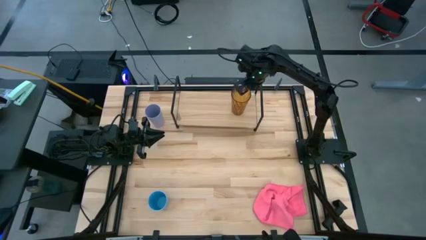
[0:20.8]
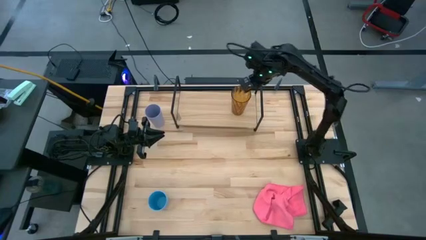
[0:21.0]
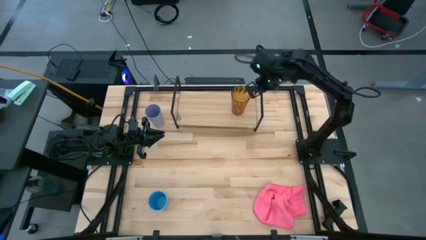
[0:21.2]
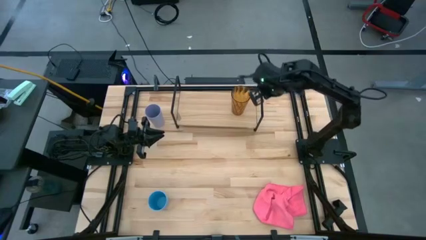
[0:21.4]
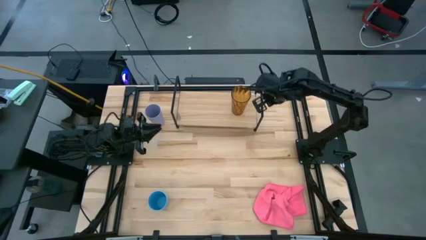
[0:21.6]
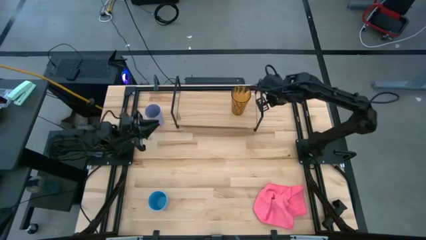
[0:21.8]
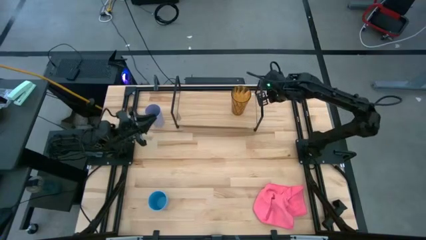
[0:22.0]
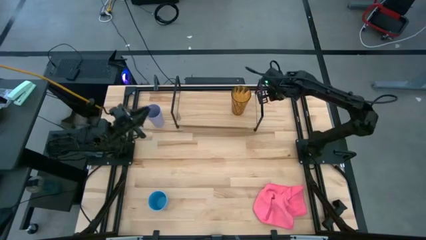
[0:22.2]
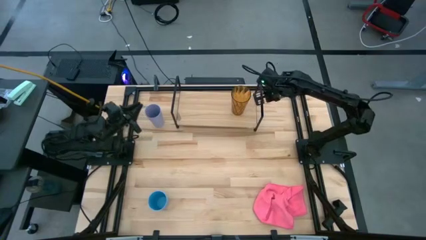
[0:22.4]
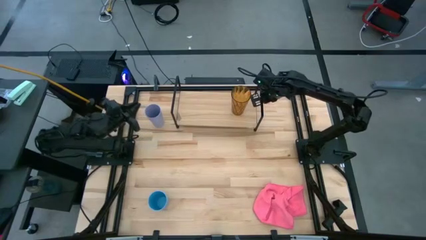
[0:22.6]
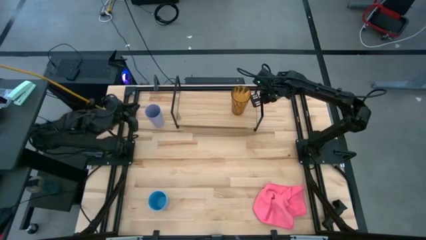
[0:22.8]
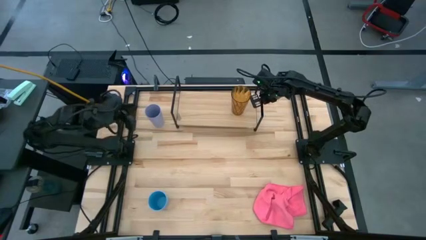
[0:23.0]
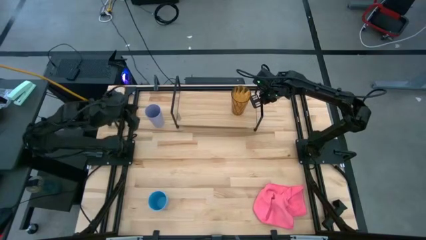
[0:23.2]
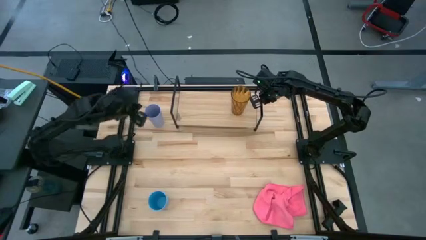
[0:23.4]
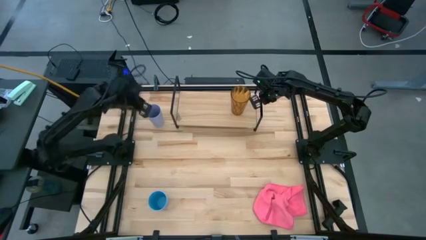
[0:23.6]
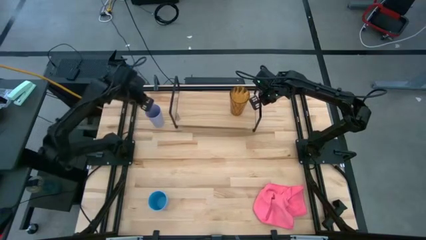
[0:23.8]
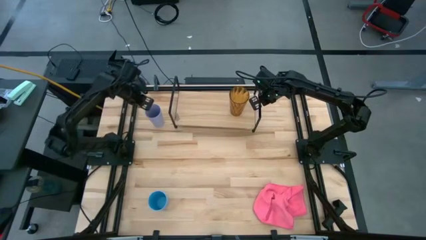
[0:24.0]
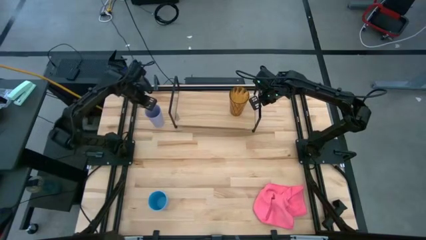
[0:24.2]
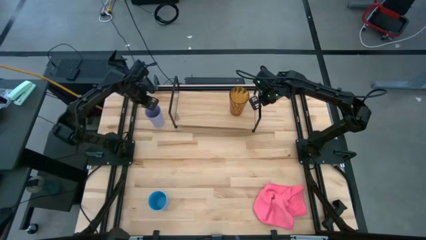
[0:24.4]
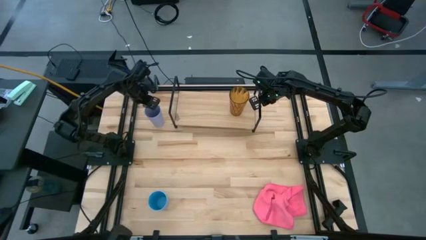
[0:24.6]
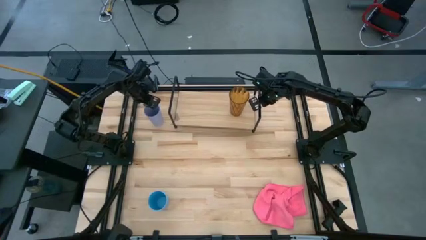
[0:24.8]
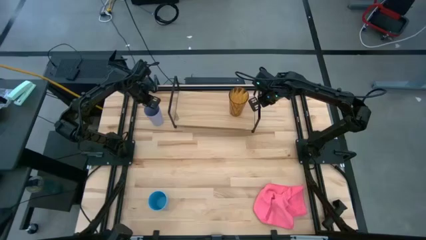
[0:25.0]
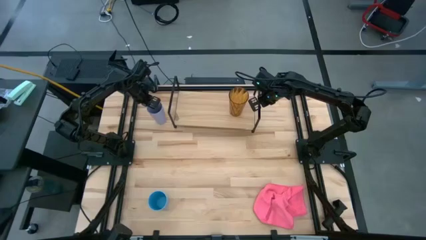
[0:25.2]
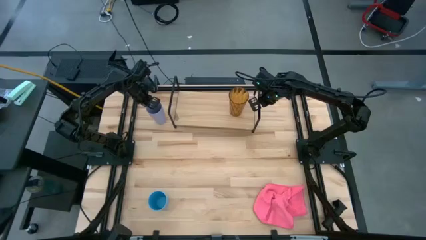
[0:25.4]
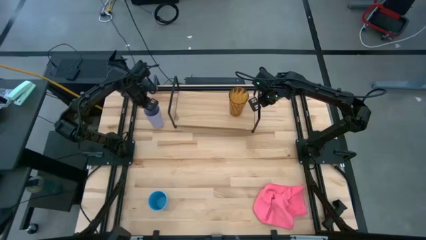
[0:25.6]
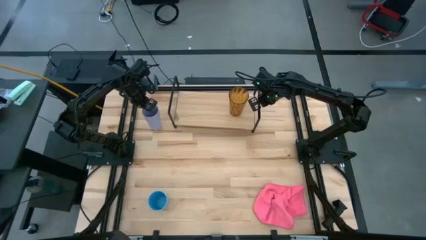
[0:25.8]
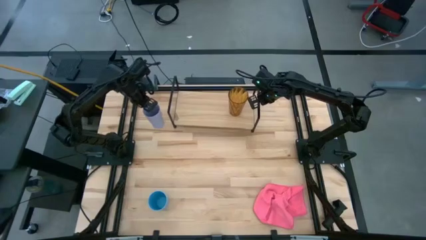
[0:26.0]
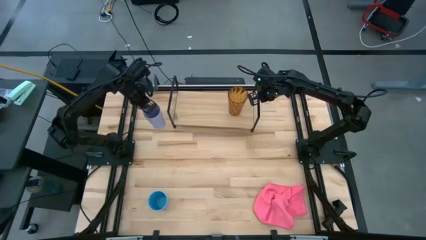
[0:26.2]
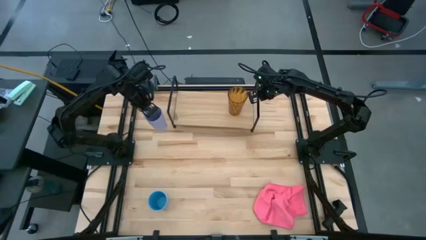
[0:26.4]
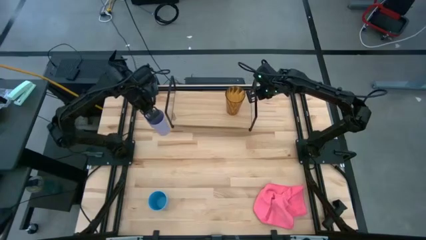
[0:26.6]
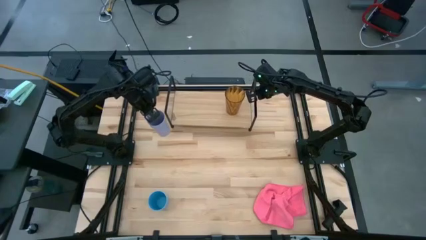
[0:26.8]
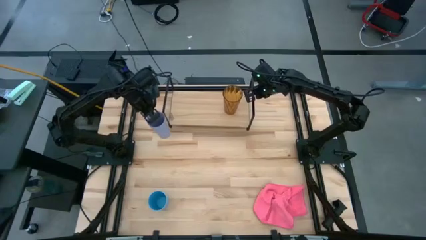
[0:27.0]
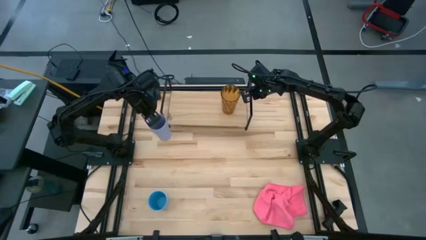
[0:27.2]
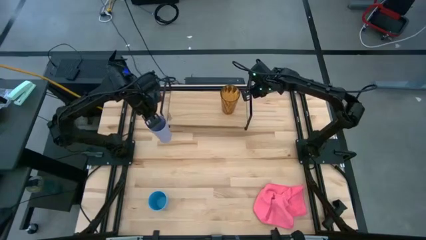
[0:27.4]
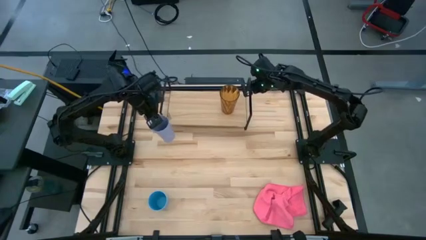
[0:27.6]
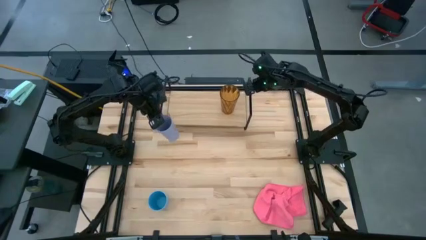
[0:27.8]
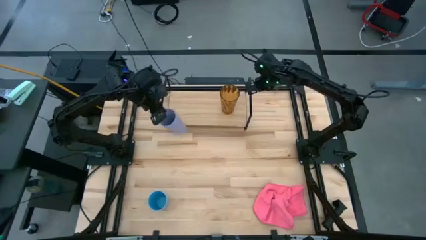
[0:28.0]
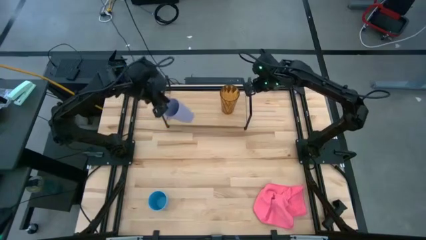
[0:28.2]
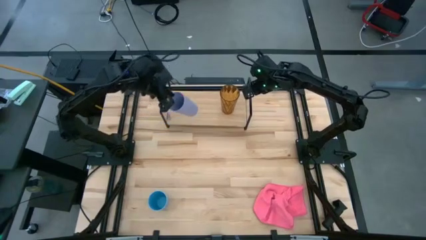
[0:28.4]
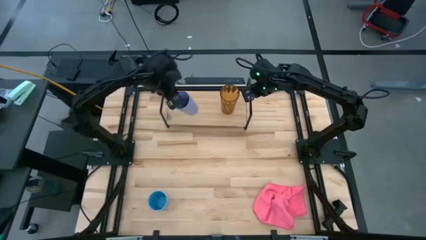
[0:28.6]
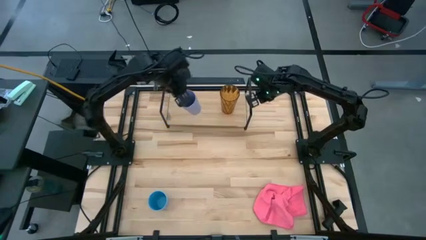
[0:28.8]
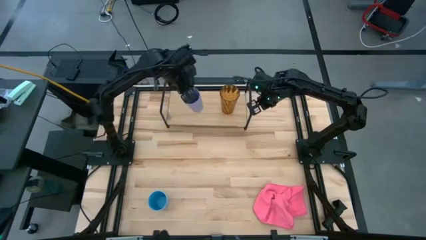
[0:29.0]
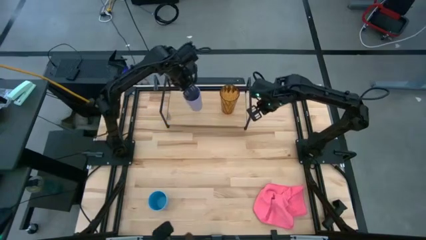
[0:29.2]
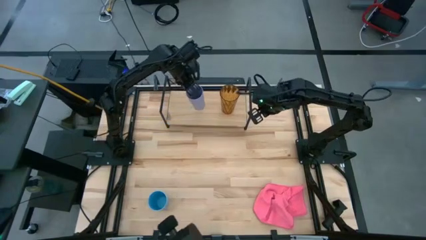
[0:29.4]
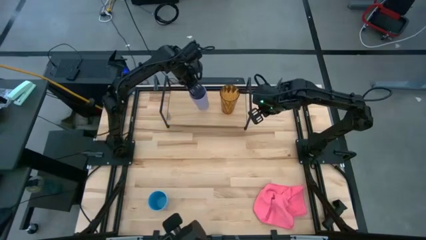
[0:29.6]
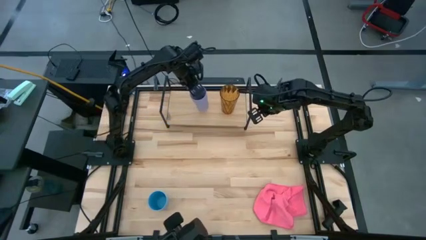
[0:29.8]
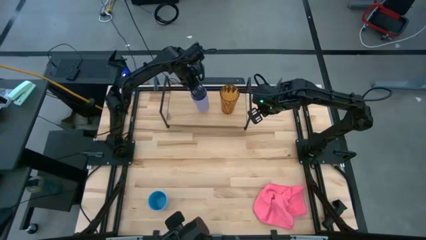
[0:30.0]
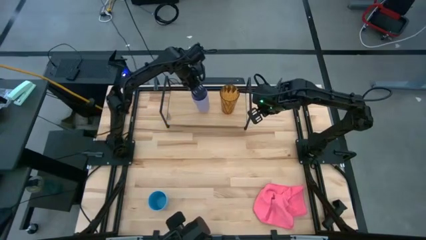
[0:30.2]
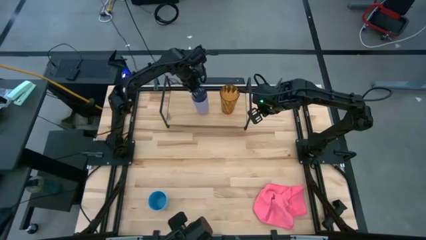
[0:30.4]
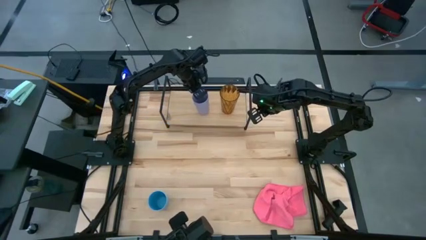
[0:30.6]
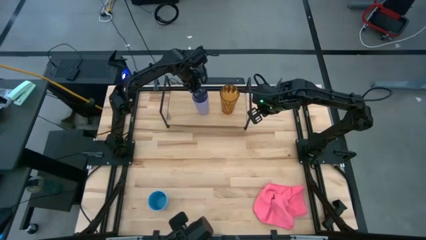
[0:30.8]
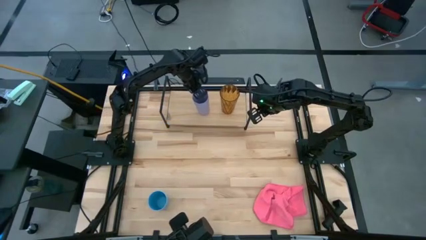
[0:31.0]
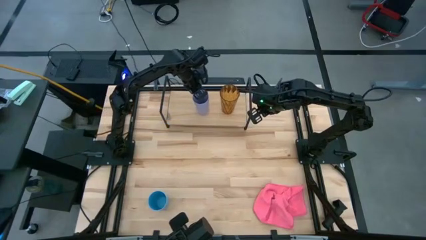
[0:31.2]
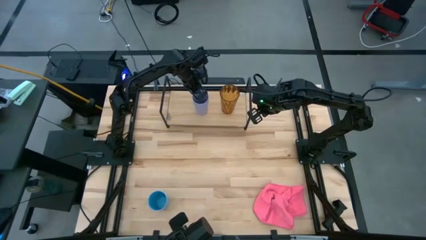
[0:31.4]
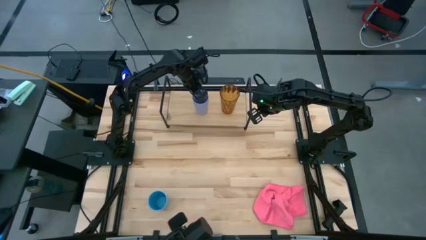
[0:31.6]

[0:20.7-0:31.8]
Task: Stack small to large cups/mugs on shelf
Put the purple cup on the shelf

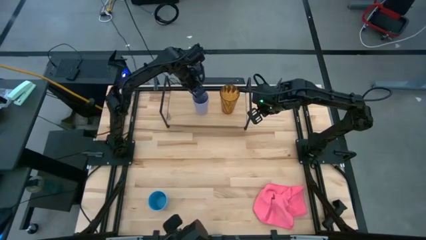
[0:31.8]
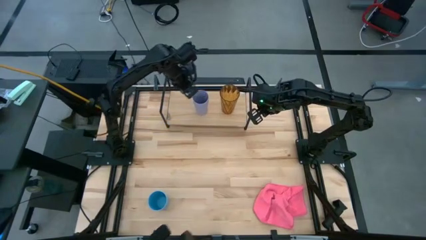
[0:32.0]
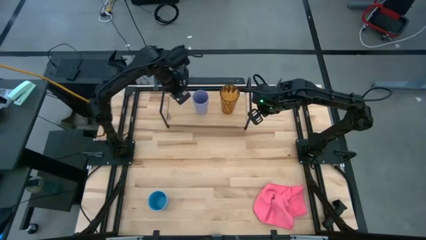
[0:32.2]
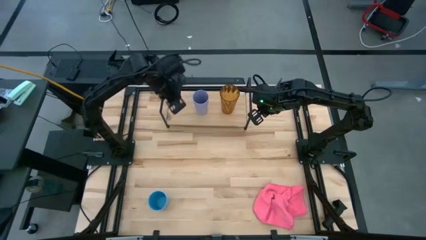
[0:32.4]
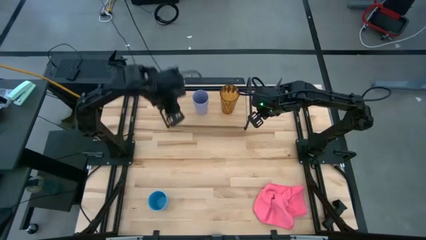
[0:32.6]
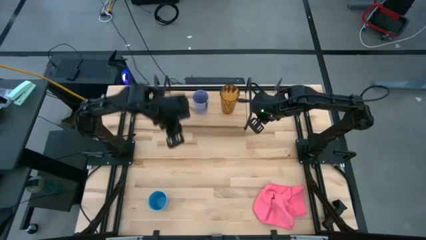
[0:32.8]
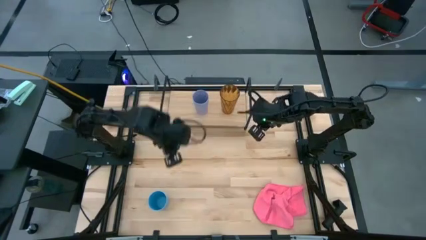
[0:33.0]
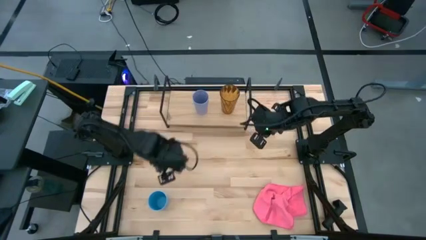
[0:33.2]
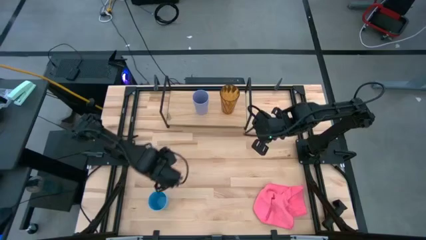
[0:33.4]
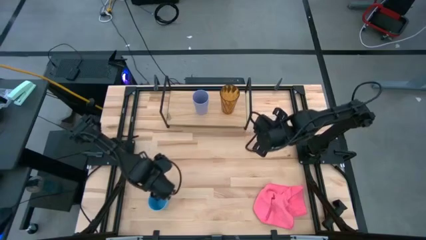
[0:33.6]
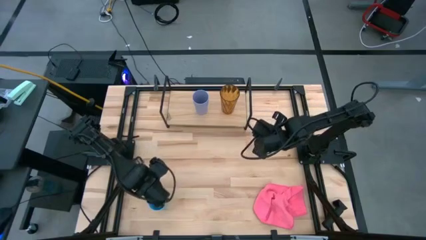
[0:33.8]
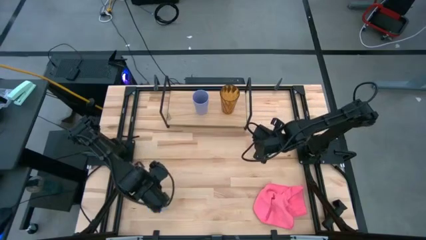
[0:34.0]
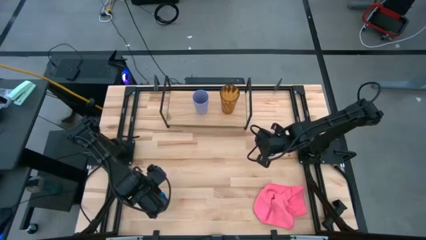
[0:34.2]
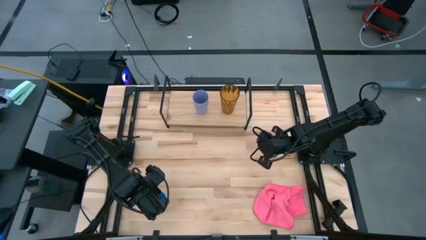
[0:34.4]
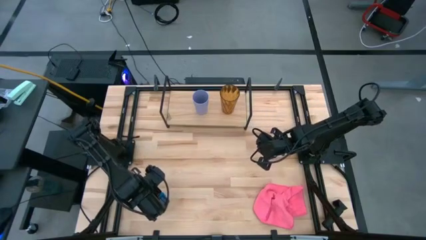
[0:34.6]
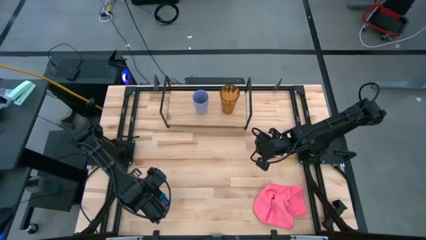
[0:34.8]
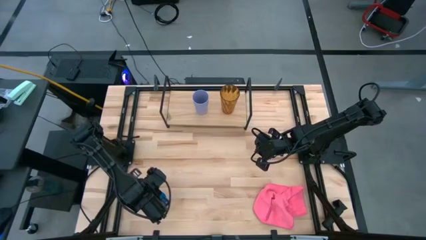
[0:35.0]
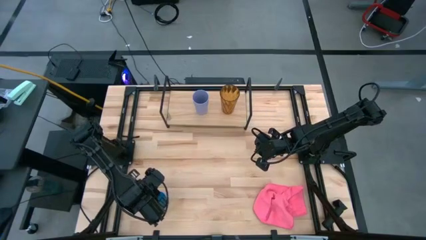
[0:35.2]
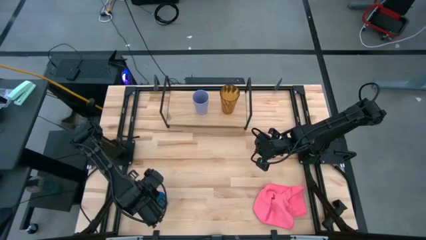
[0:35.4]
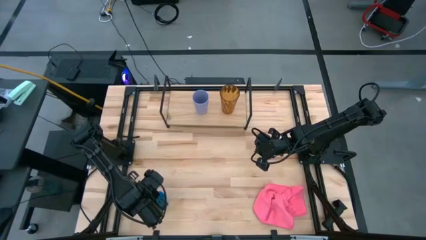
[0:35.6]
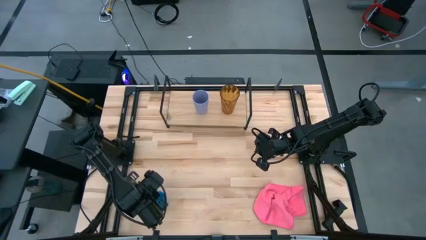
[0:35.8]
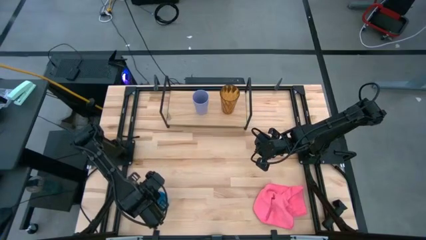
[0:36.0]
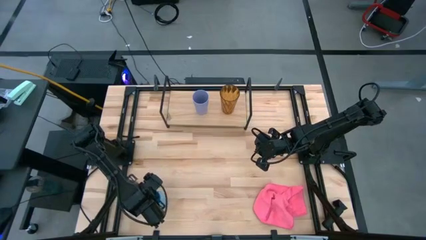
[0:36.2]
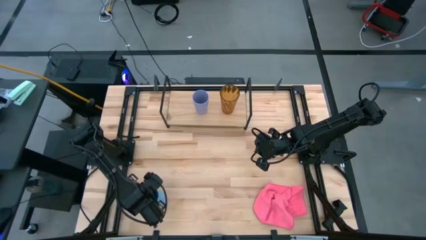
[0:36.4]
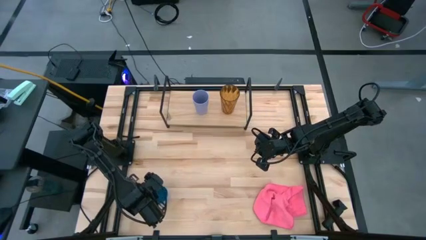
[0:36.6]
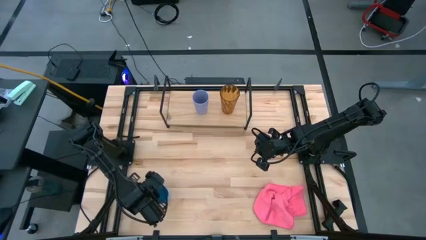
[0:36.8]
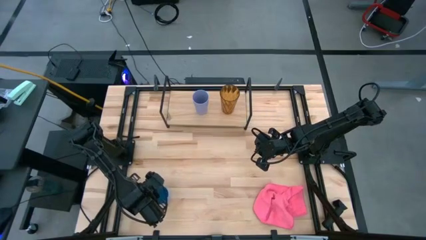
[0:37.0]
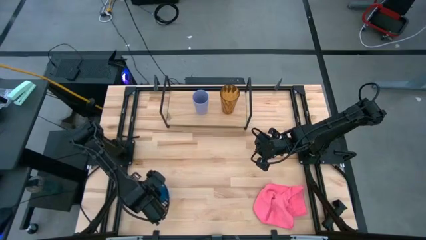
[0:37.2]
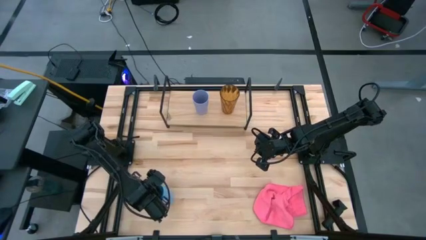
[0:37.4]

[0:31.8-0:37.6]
Put the blue cup on the shelf
